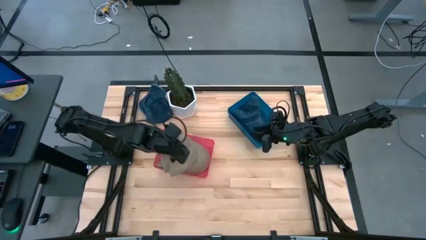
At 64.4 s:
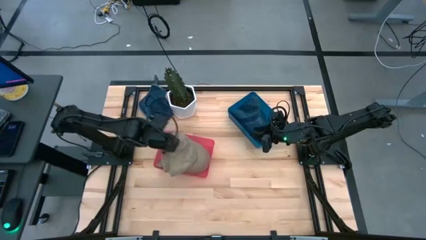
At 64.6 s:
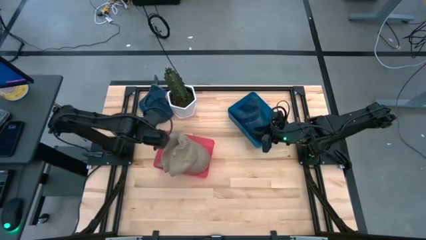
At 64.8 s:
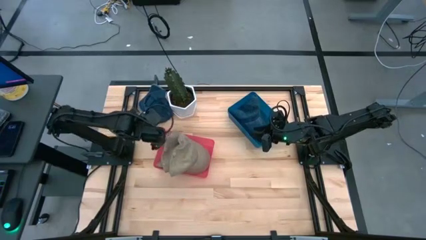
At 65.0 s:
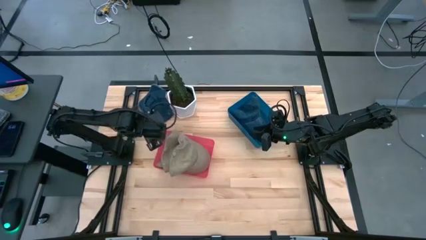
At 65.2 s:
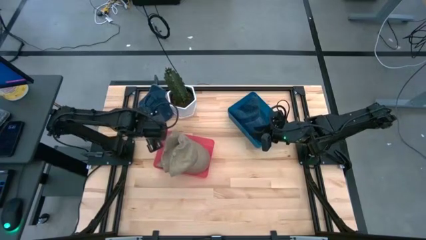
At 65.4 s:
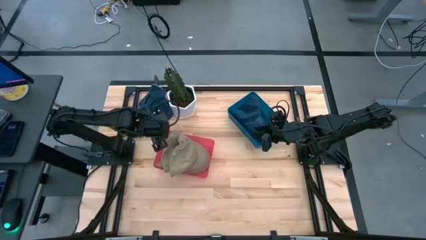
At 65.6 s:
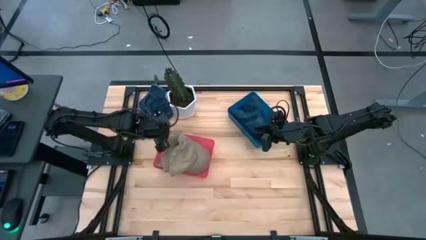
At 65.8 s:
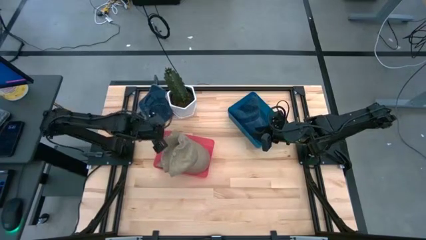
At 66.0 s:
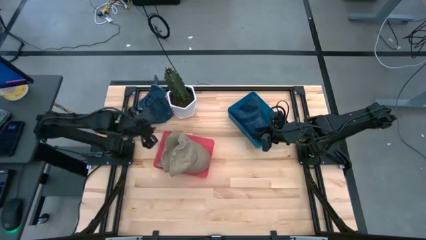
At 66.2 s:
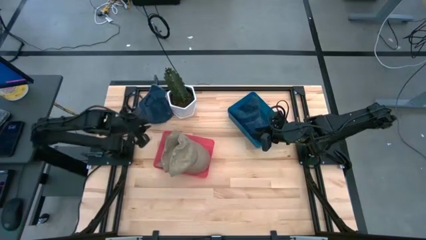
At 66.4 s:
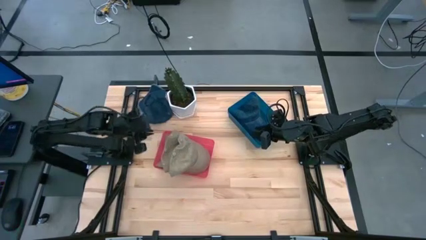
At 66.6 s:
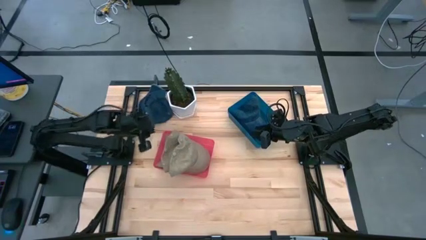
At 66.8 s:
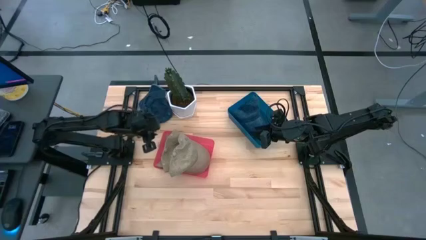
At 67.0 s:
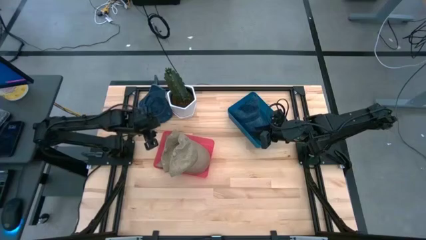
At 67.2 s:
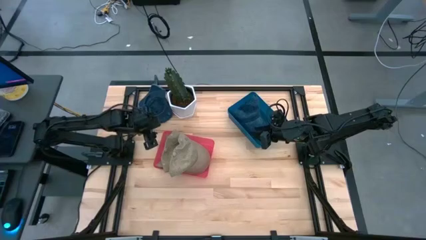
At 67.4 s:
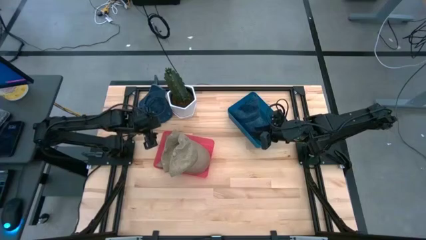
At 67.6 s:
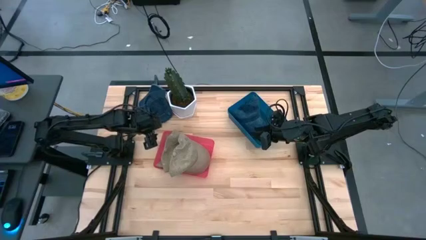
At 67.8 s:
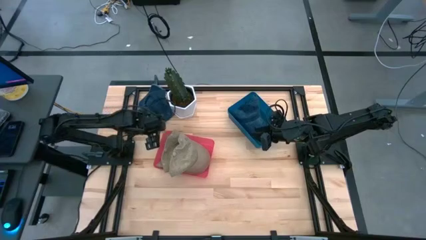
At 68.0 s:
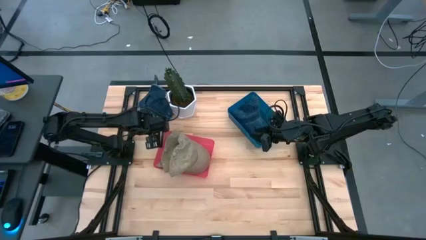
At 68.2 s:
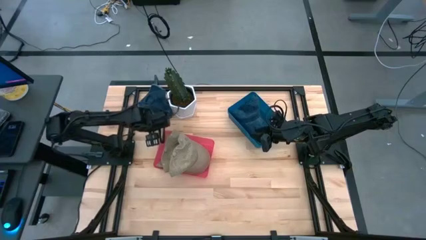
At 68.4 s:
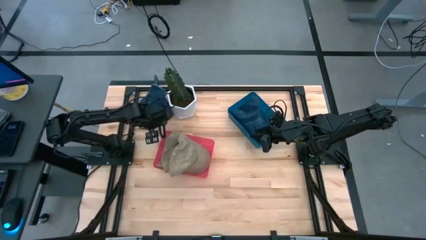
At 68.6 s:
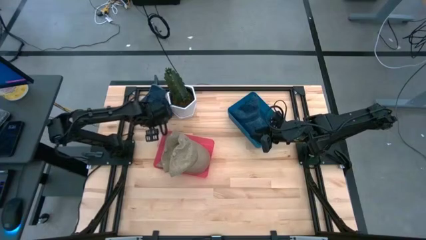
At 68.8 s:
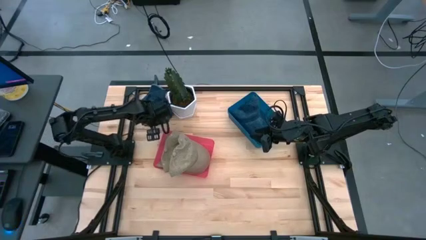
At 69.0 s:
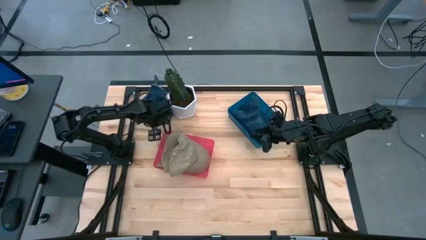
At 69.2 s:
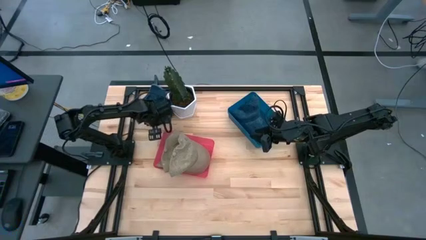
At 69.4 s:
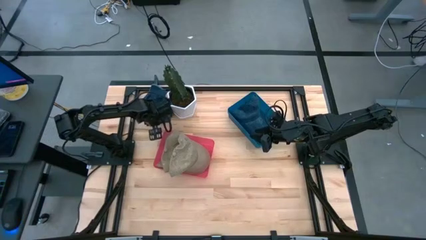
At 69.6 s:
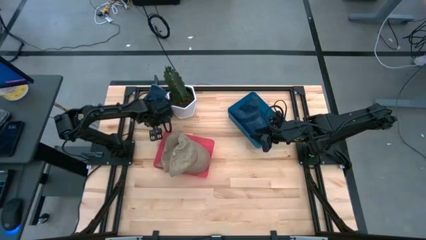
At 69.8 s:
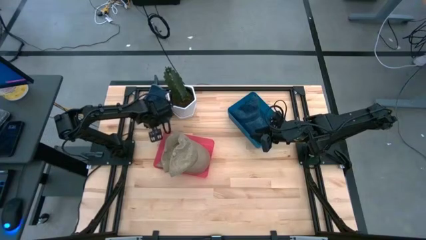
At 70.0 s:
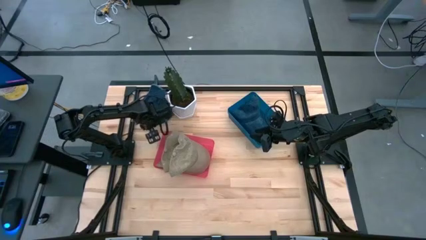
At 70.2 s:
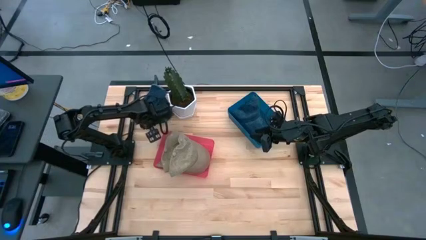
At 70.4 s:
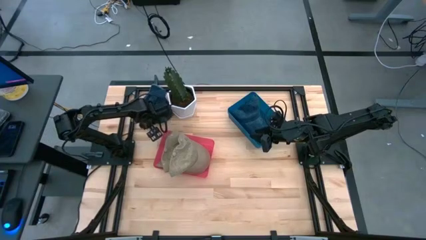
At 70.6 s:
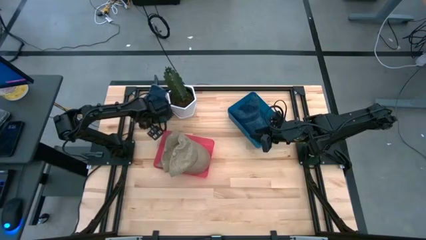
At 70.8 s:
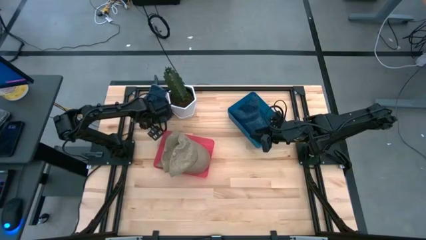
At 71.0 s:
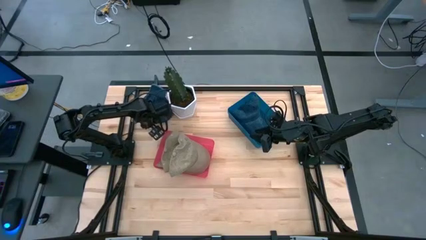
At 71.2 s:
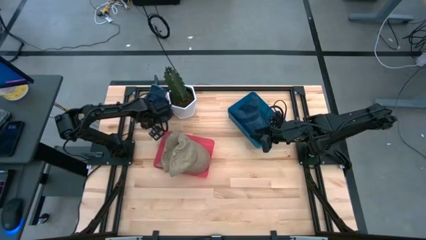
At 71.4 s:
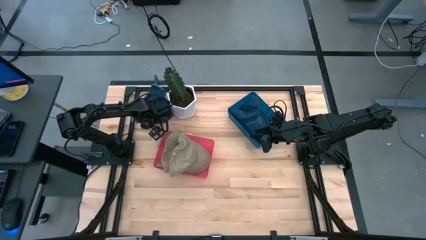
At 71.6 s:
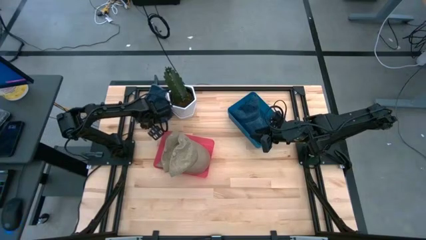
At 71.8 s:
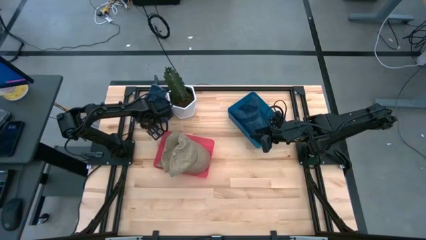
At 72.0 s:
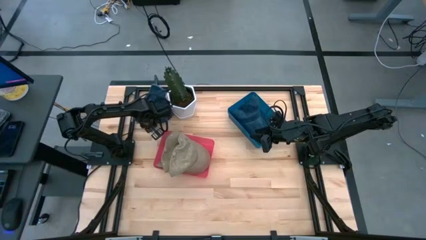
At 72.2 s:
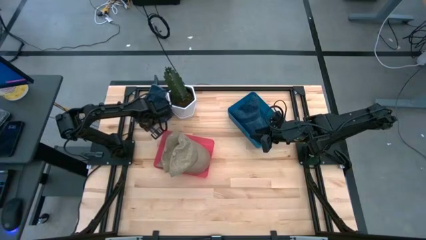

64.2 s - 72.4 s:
Task: Pick & Place hat
Put the blue cap into the blue bin

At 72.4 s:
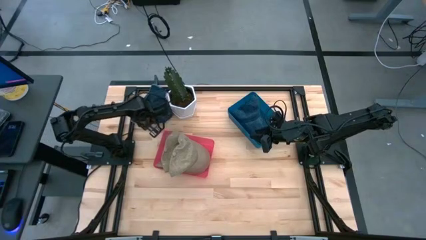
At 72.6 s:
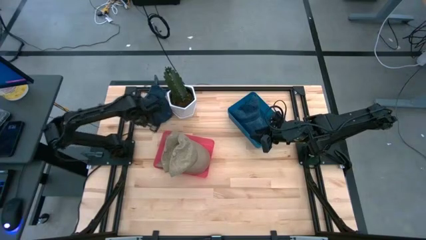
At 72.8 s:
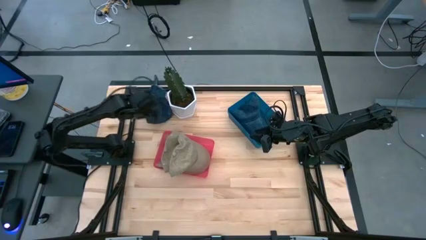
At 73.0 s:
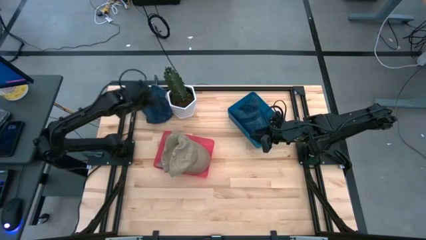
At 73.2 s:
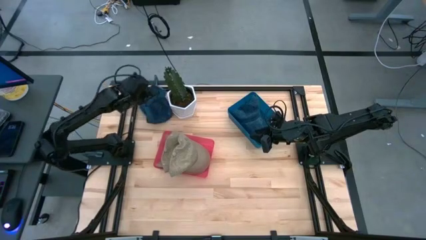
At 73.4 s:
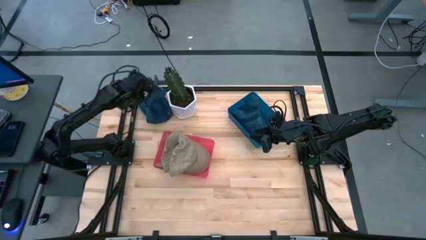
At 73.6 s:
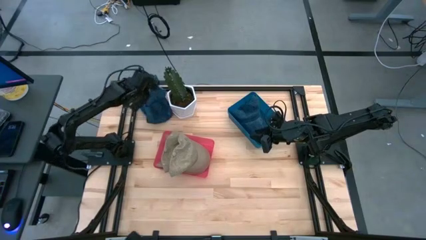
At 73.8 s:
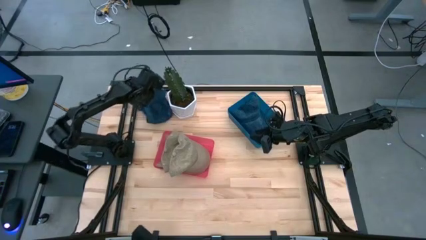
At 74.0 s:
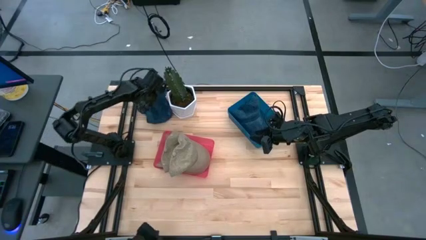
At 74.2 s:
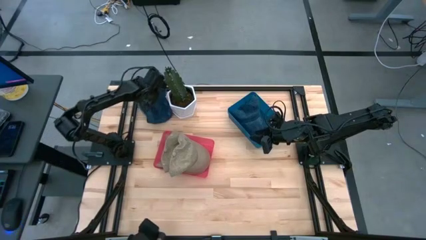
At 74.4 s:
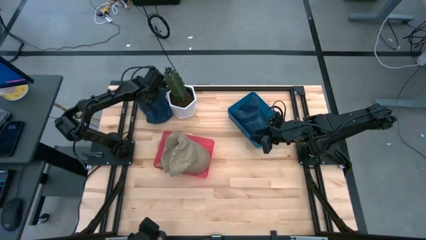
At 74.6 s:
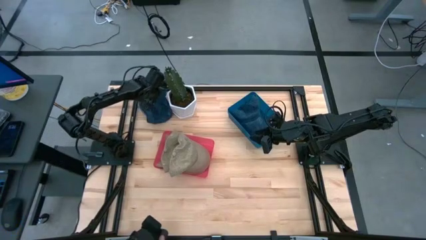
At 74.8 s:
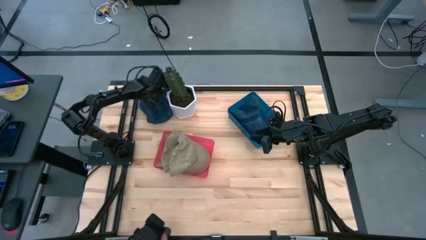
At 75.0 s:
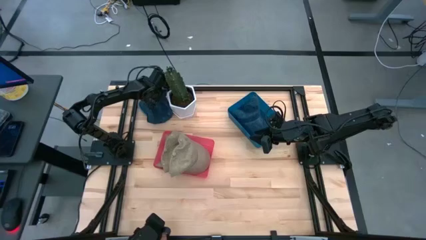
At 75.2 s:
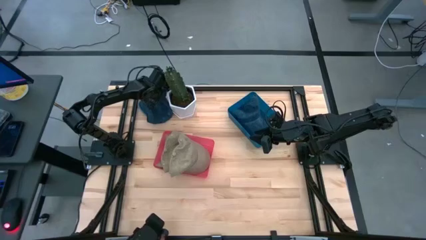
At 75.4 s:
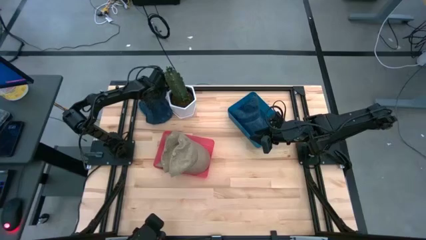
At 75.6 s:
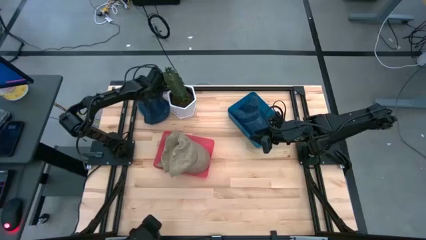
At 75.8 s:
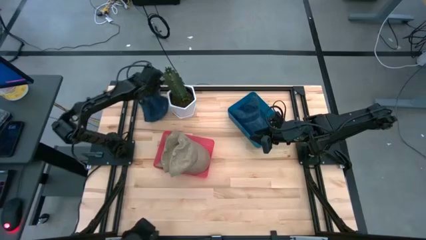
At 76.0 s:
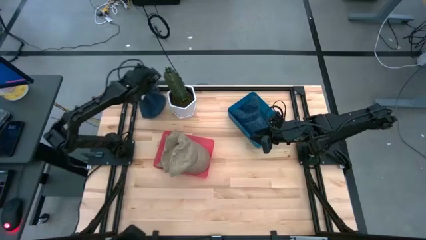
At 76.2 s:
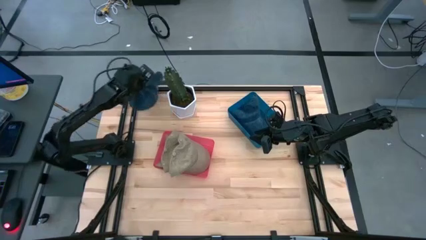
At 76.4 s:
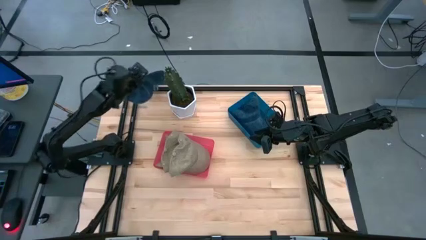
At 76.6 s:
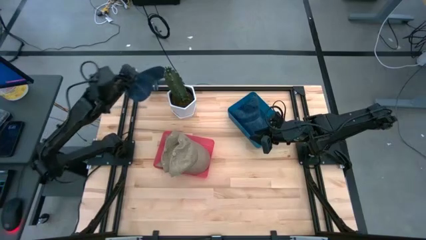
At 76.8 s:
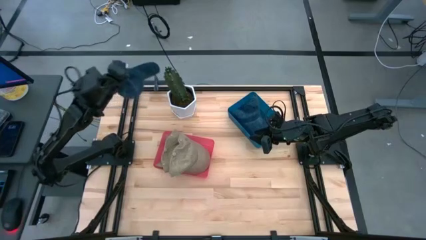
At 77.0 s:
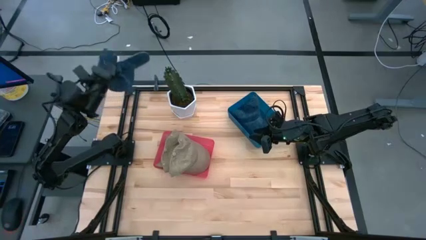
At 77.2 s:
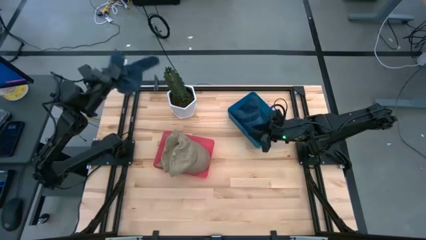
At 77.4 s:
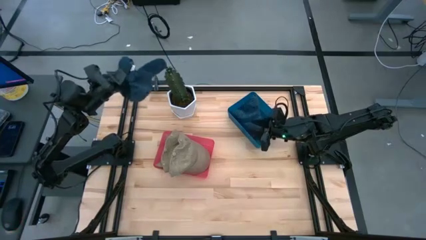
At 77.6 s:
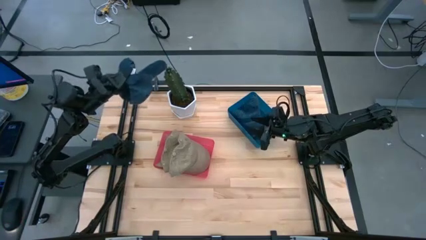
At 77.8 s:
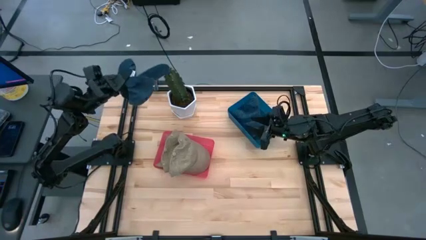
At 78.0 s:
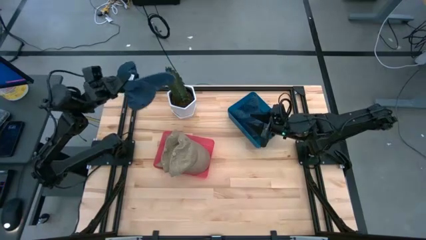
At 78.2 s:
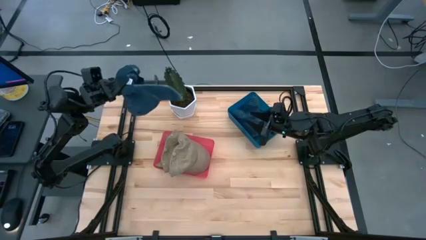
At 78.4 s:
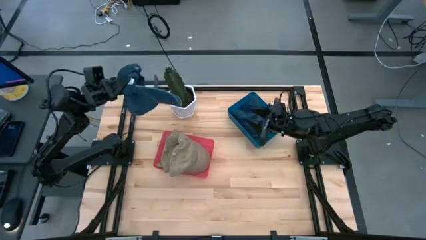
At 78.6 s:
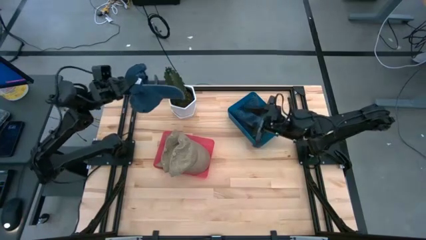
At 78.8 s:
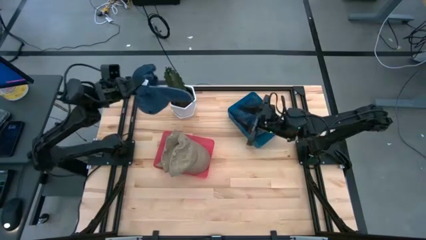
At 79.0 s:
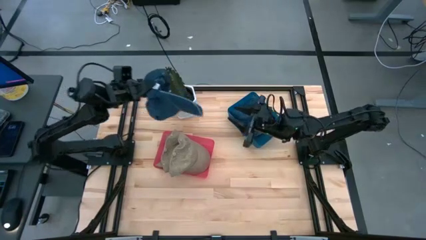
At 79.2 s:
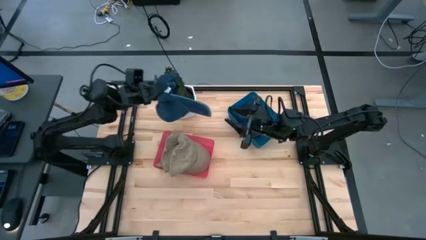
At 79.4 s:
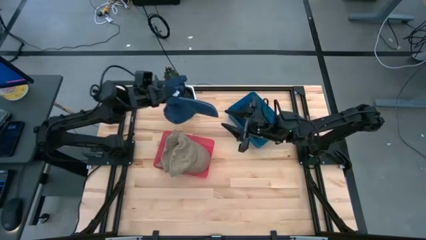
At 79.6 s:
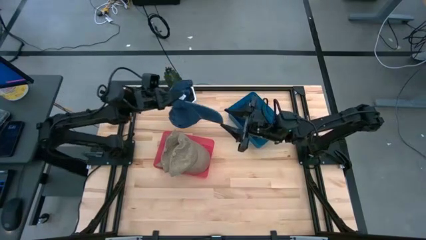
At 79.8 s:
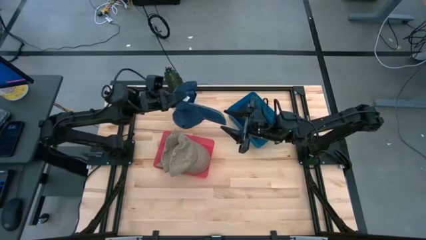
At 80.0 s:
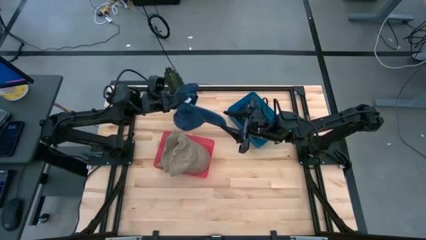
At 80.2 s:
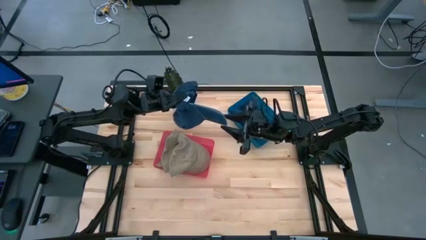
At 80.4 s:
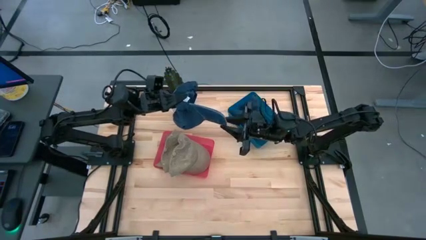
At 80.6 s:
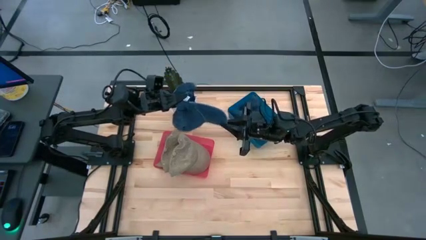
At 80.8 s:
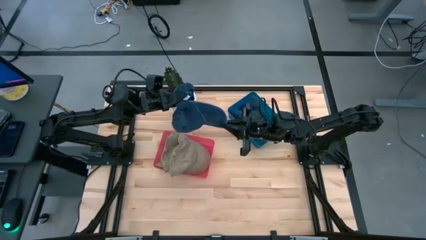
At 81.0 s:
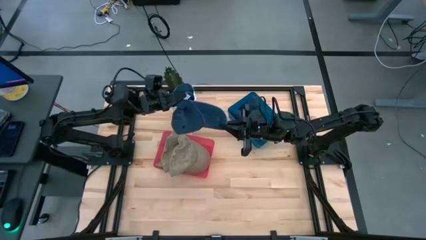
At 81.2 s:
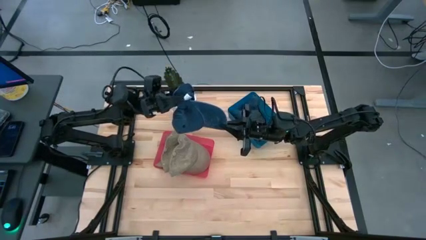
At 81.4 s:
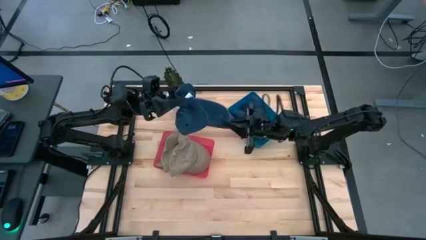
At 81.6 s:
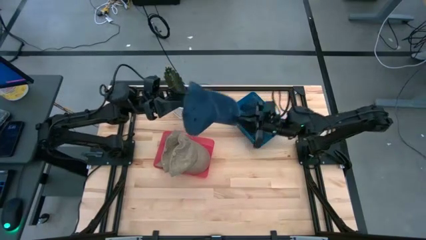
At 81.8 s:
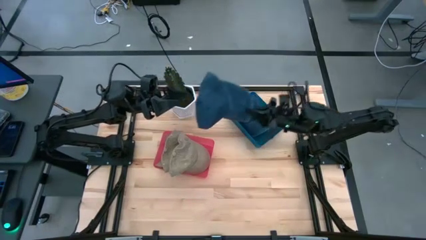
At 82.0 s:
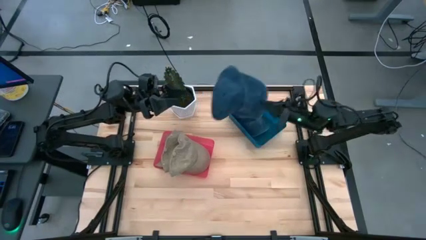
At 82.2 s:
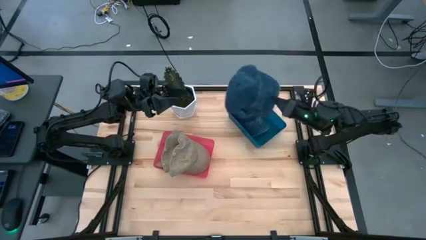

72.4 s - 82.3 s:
Put the blue cap into the blue bin
